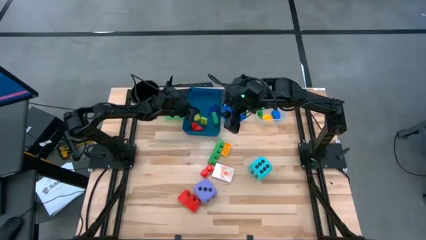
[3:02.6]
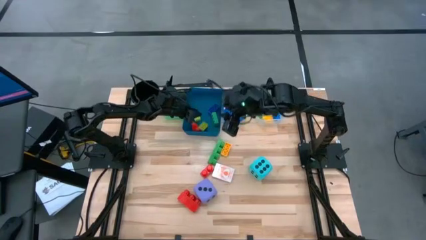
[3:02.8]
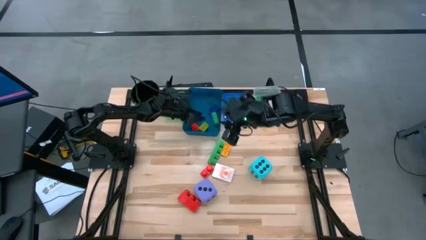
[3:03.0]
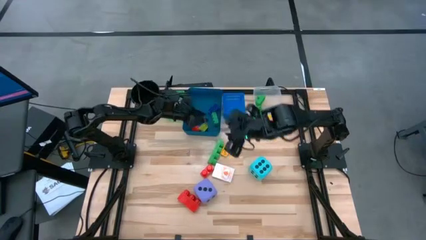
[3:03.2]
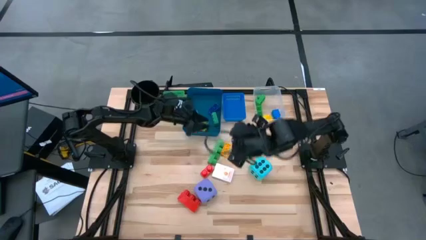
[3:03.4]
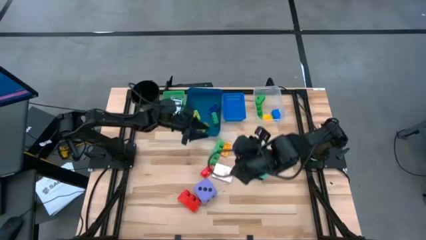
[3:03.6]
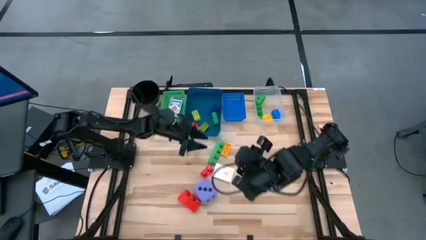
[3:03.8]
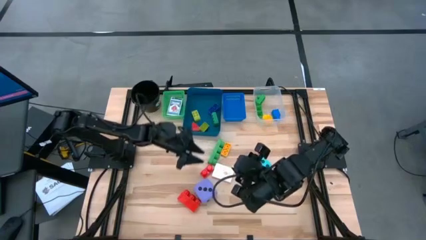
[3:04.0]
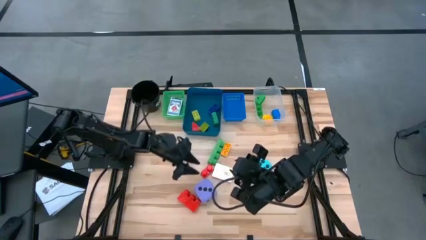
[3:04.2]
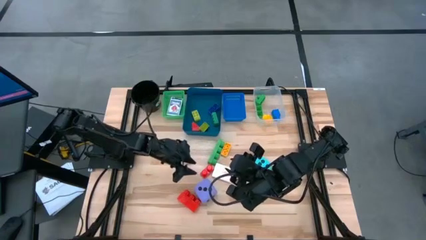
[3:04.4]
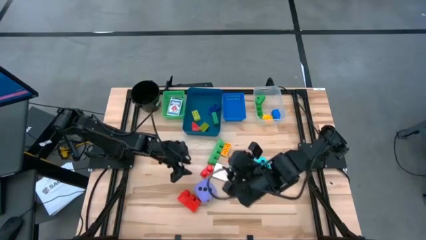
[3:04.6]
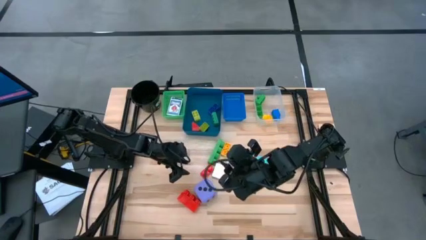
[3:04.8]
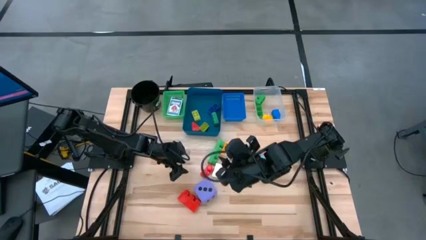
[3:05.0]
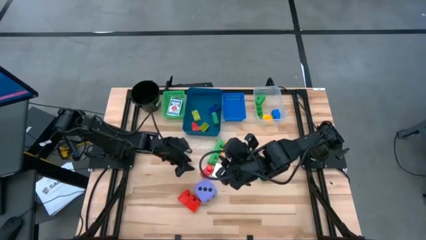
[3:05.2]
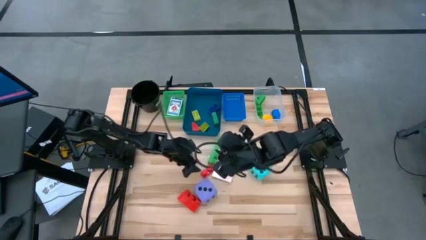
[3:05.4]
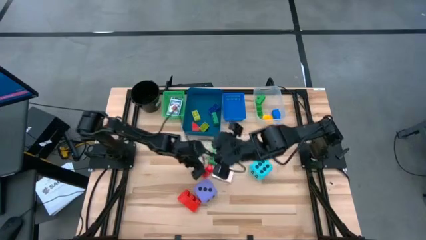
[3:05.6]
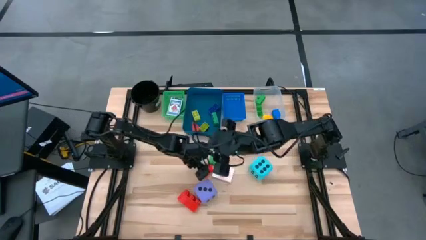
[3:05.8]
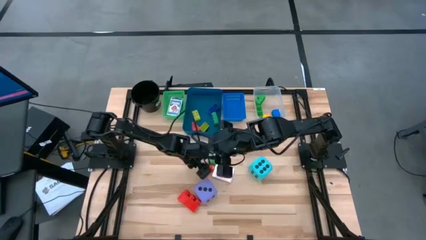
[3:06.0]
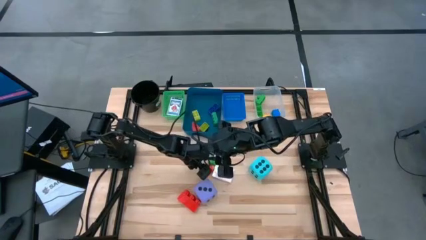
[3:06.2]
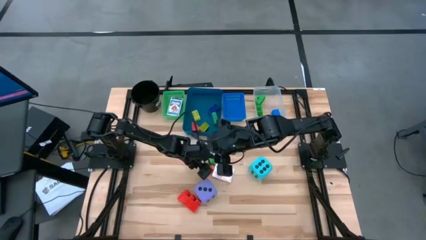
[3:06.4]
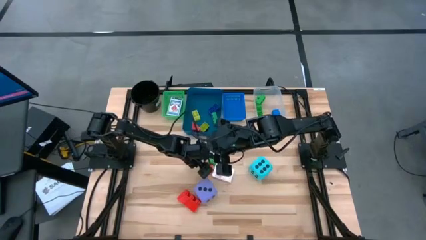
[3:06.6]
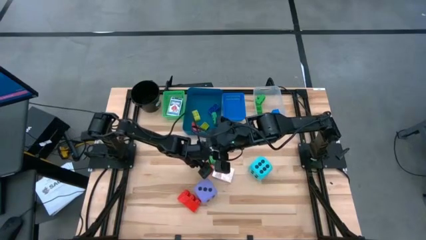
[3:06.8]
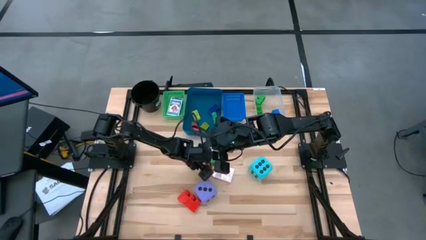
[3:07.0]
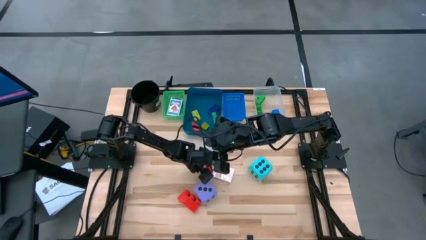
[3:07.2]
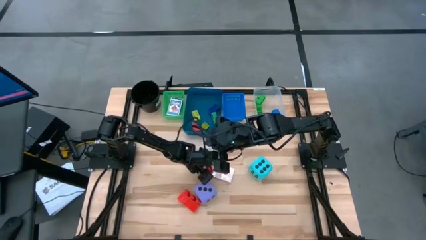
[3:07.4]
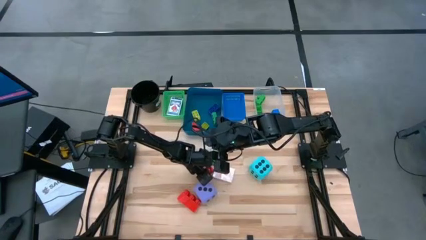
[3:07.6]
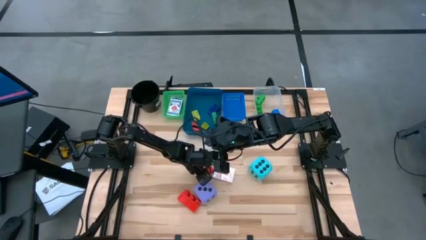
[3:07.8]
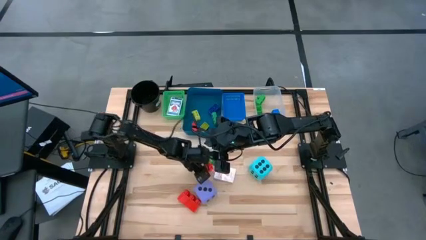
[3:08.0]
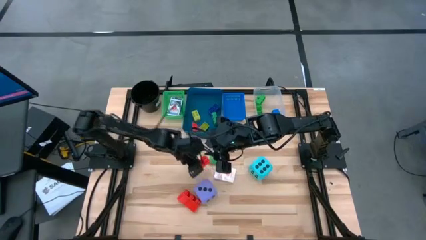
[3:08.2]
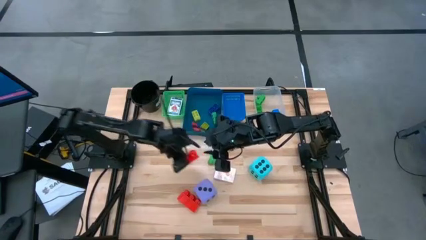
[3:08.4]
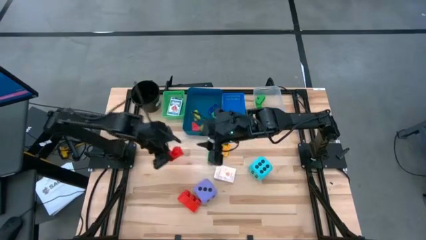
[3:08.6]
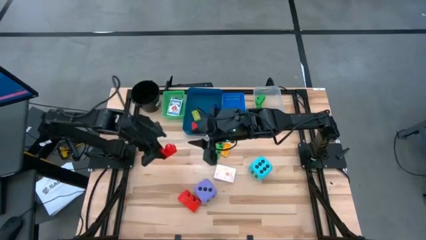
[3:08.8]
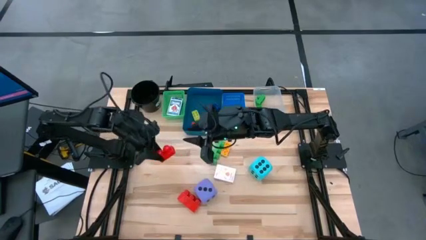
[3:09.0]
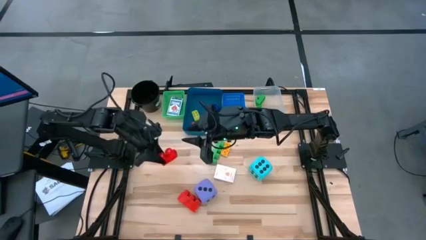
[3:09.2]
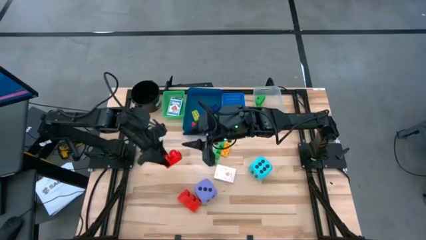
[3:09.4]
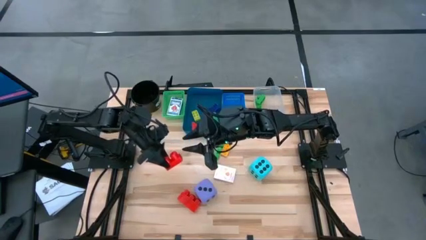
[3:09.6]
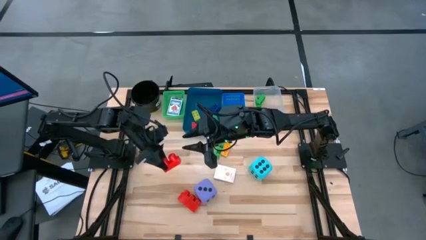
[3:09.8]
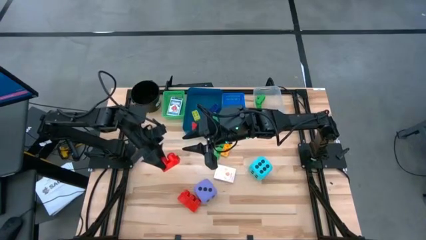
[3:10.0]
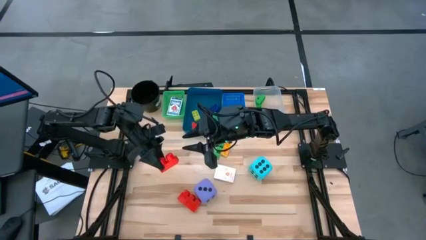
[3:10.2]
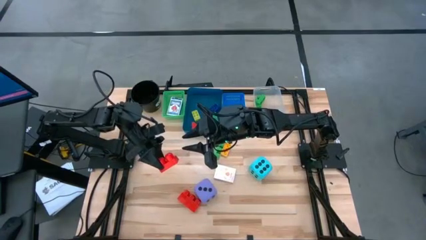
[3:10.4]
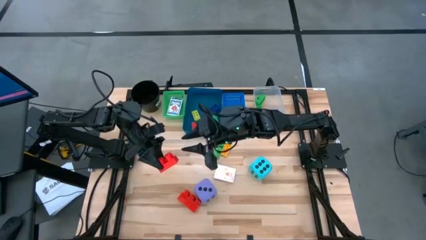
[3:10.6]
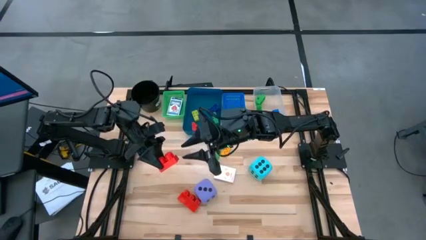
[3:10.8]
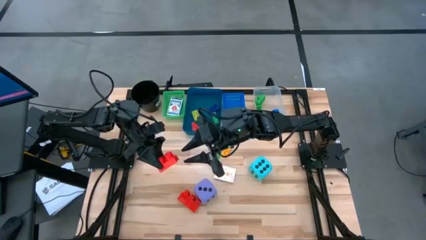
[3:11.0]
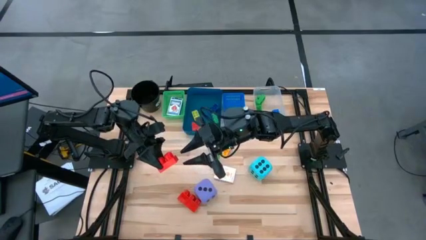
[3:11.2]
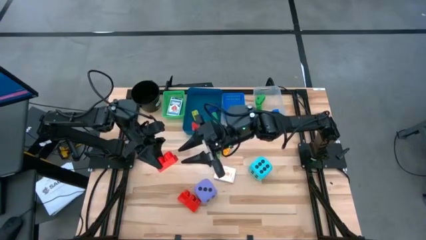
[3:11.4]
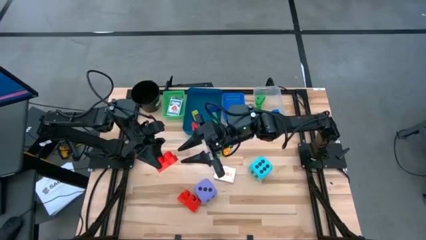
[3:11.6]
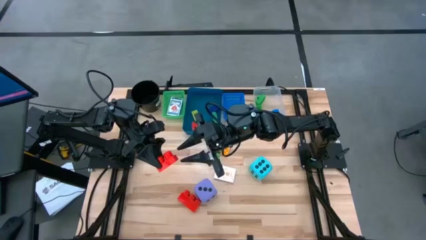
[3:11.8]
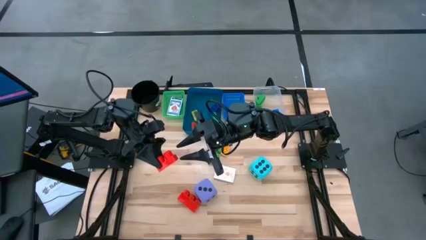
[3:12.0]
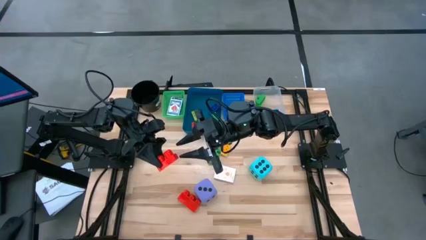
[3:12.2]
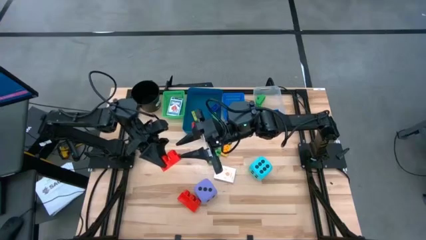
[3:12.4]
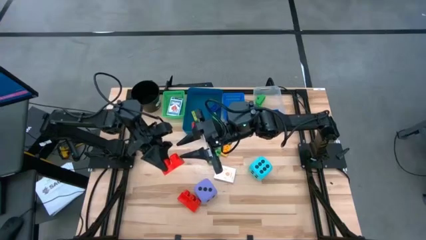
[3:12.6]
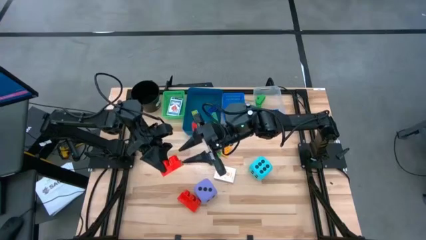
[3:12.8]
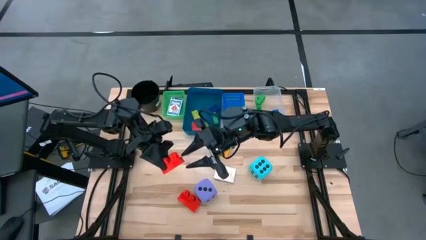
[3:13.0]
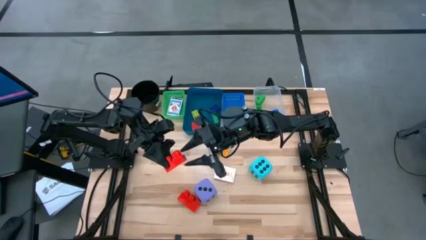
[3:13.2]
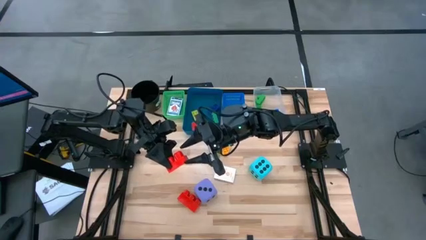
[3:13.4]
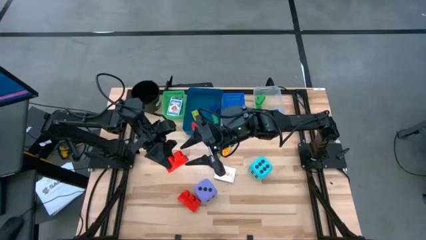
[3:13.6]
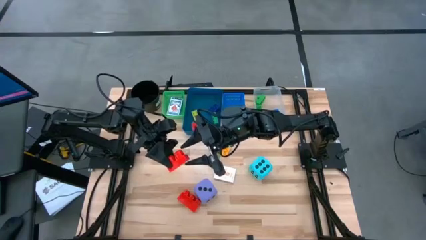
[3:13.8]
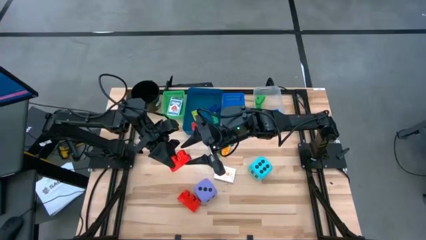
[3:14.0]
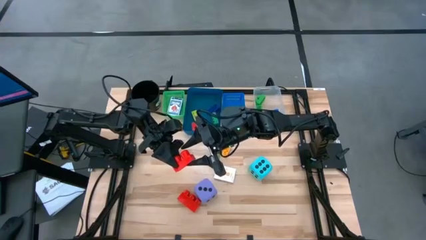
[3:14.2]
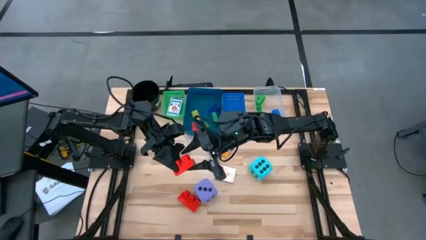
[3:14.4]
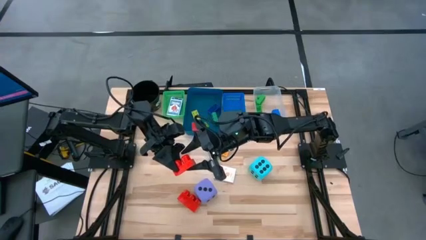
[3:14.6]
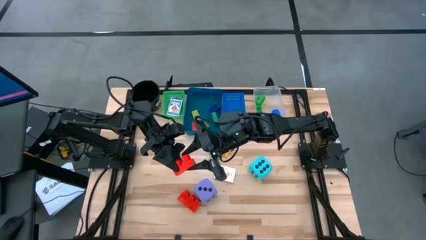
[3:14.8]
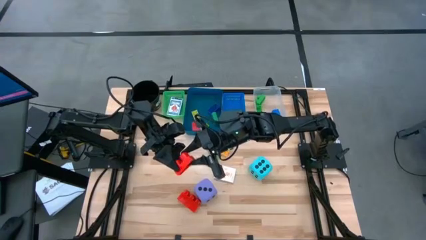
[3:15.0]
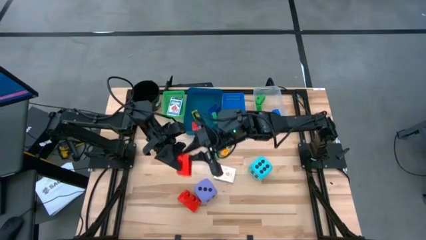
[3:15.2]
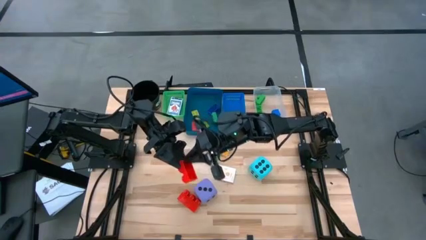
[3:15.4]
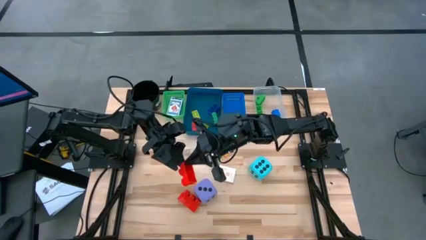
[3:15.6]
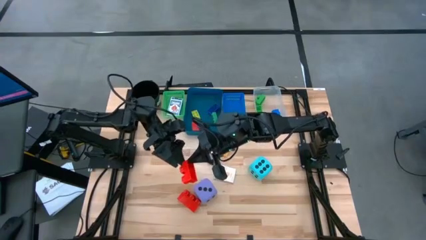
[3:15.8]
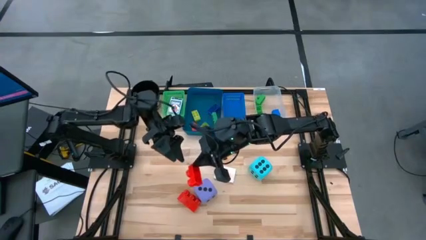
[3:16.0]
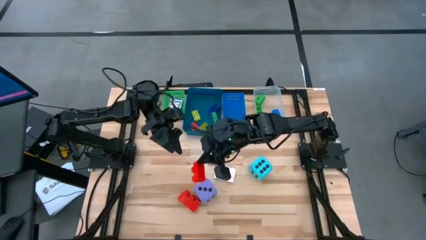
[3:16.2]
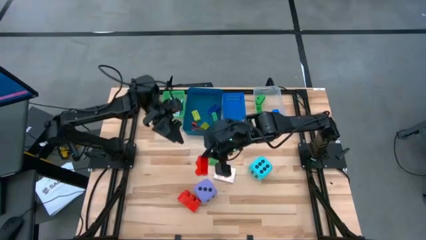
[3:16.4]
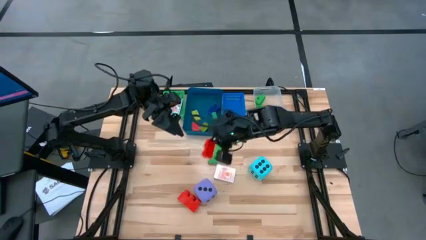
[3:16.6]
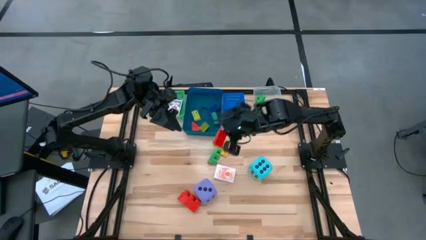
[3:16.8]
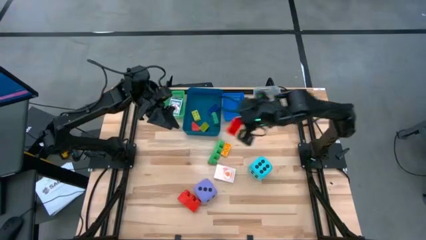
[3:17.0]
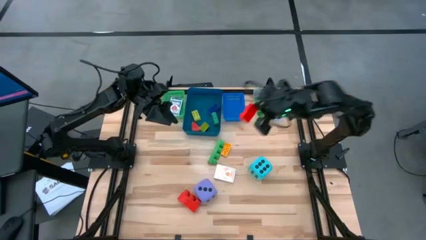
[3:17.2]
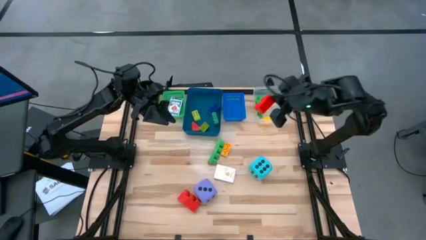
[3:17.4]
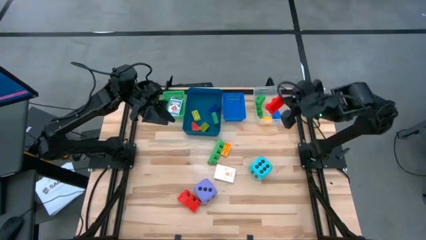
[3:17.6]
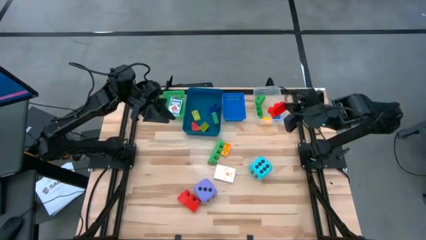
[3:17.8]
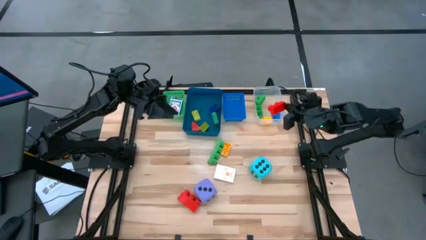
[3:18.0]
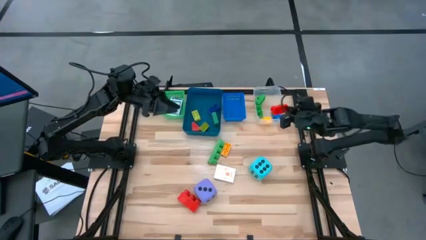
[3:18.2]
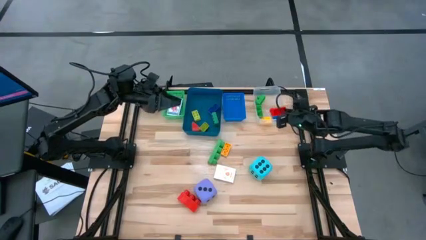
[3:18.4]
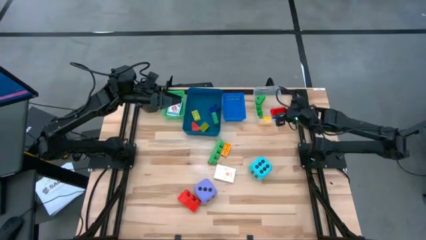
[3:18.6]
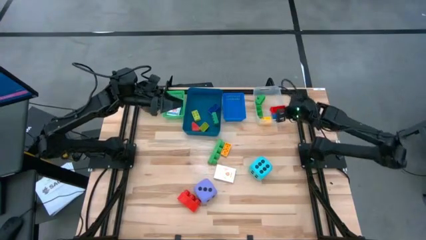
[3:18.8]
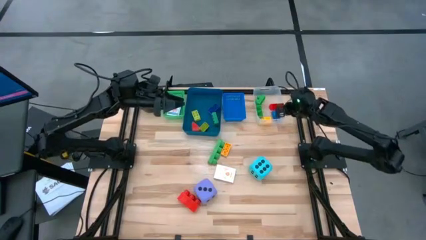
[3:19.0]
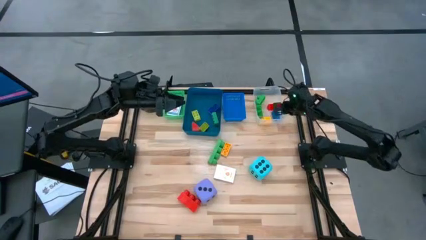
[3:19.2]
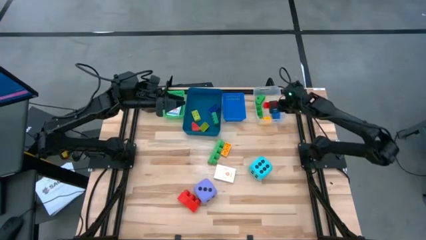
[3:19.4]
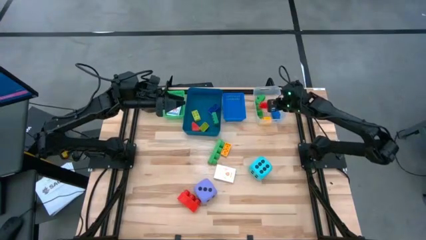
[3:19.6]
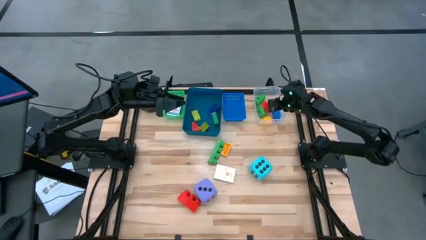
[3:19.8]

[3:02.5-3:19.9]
Task: Pick & Place Toys
Put the large red game piece into the transparent bin
